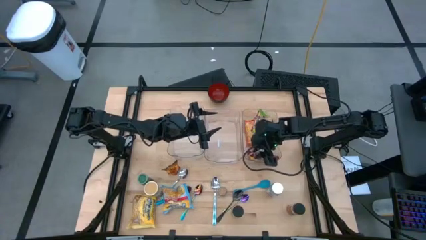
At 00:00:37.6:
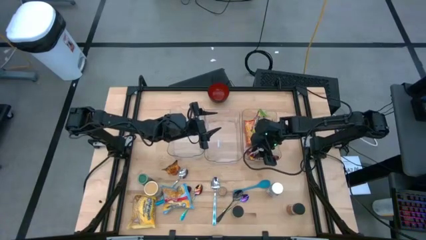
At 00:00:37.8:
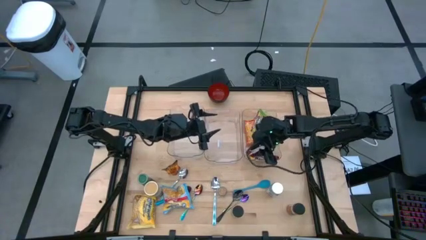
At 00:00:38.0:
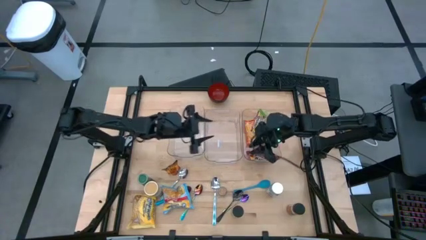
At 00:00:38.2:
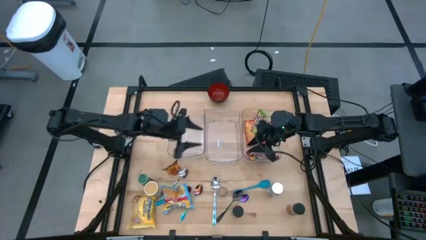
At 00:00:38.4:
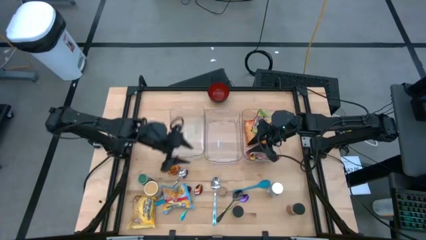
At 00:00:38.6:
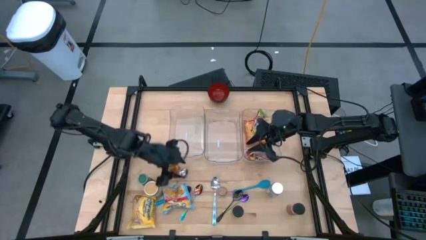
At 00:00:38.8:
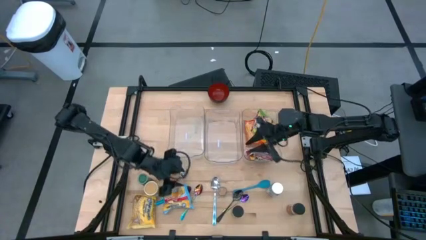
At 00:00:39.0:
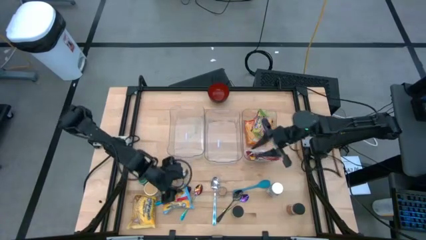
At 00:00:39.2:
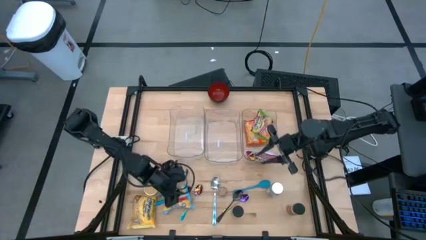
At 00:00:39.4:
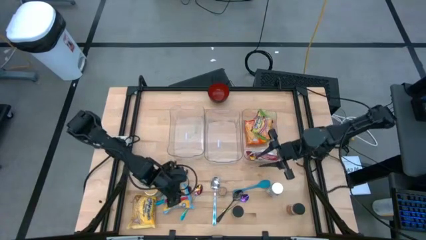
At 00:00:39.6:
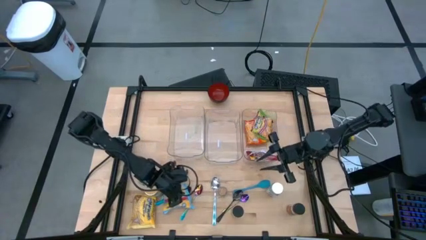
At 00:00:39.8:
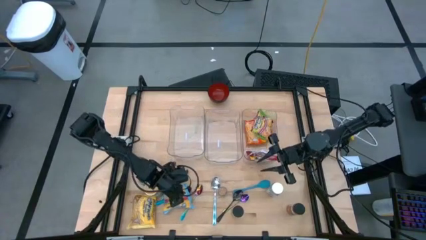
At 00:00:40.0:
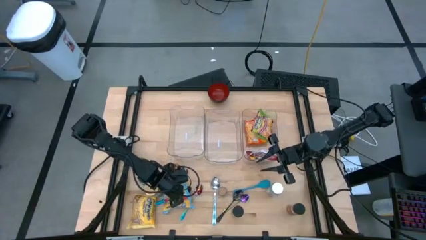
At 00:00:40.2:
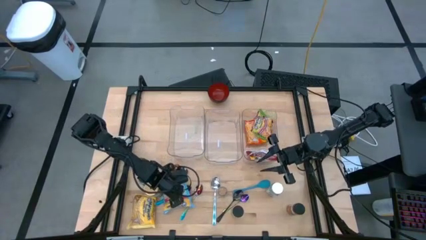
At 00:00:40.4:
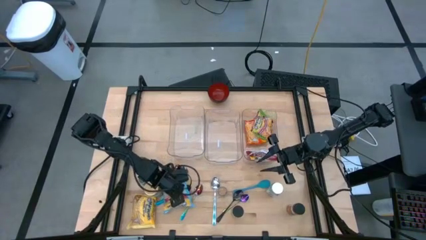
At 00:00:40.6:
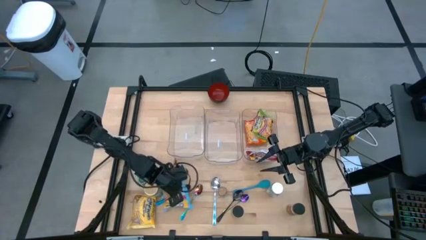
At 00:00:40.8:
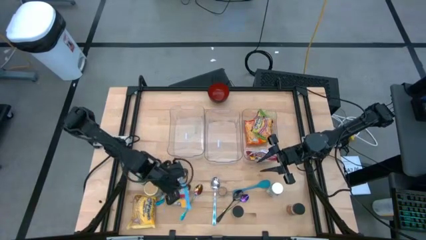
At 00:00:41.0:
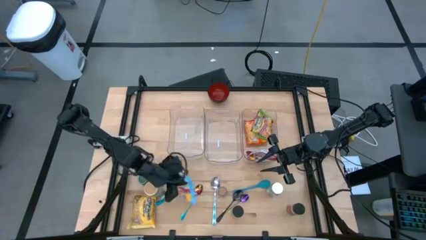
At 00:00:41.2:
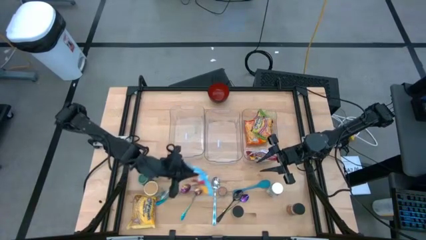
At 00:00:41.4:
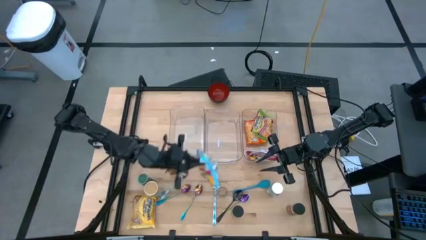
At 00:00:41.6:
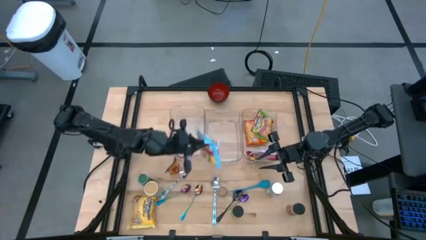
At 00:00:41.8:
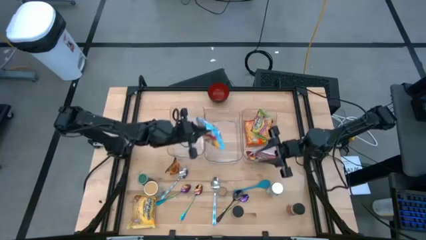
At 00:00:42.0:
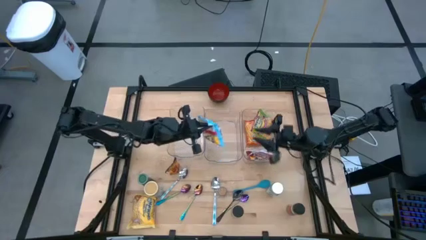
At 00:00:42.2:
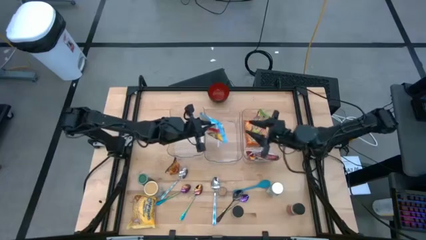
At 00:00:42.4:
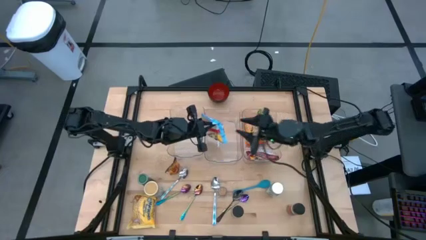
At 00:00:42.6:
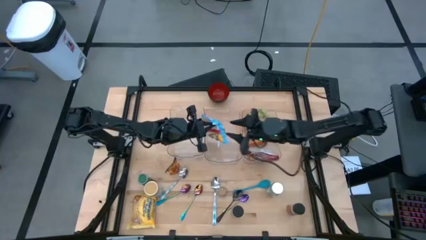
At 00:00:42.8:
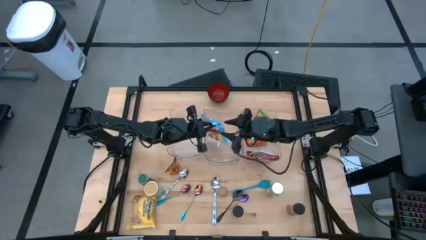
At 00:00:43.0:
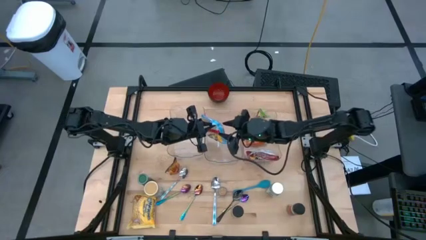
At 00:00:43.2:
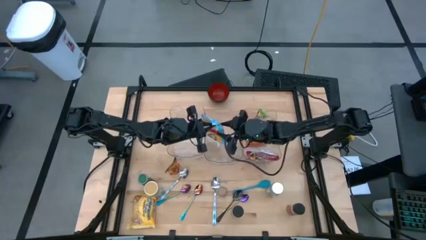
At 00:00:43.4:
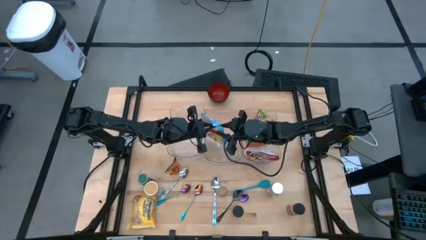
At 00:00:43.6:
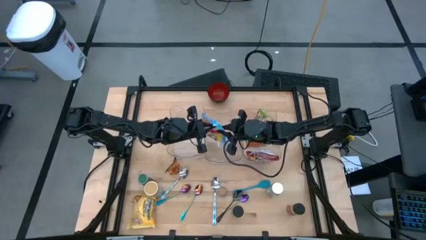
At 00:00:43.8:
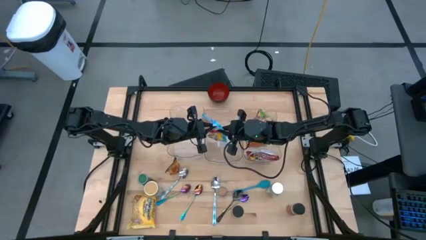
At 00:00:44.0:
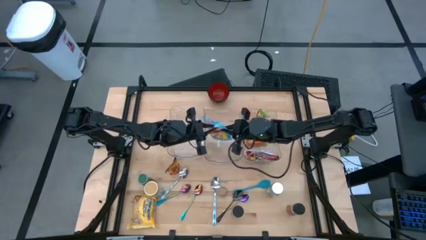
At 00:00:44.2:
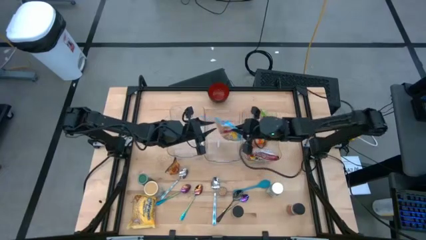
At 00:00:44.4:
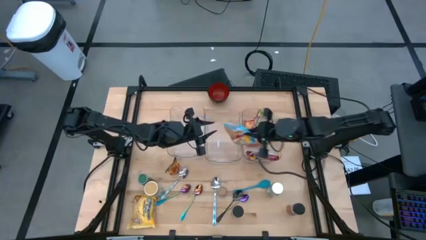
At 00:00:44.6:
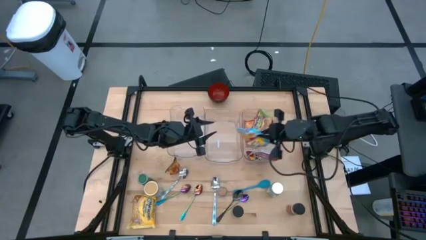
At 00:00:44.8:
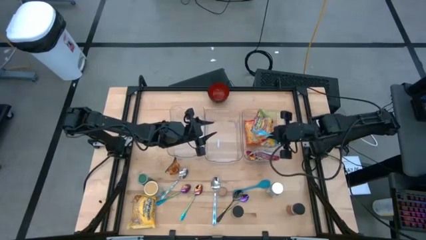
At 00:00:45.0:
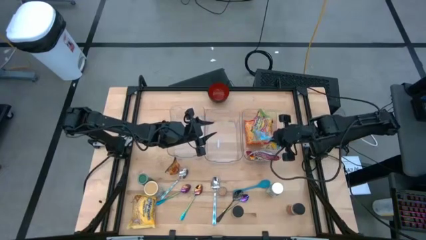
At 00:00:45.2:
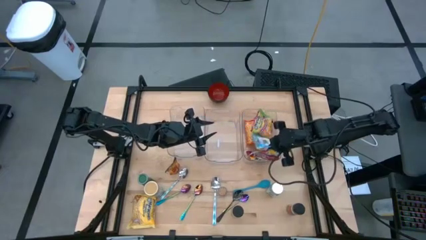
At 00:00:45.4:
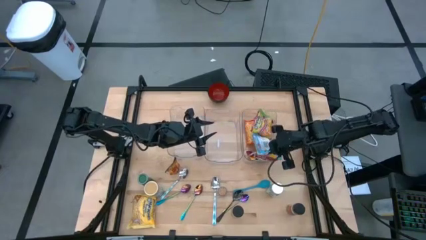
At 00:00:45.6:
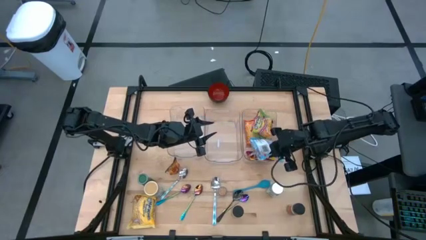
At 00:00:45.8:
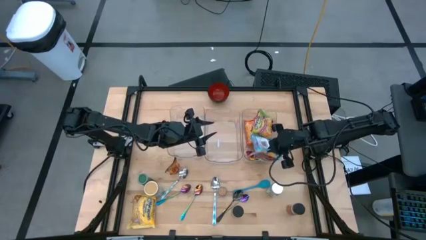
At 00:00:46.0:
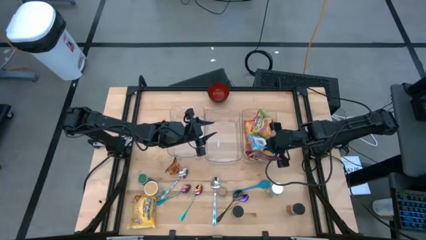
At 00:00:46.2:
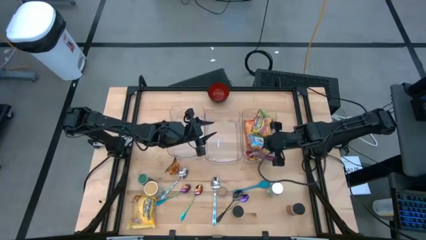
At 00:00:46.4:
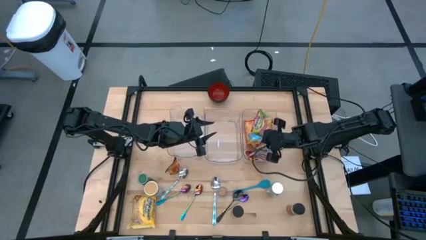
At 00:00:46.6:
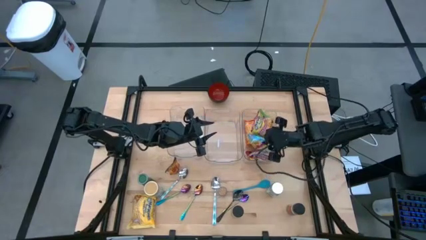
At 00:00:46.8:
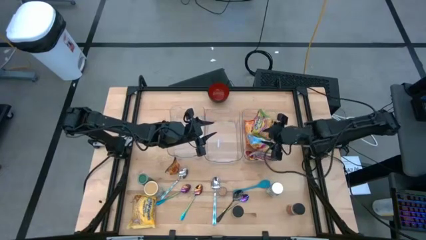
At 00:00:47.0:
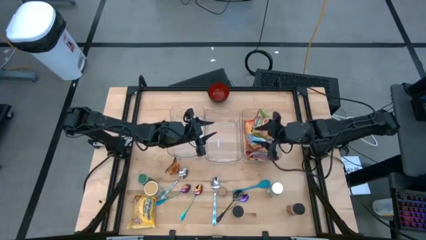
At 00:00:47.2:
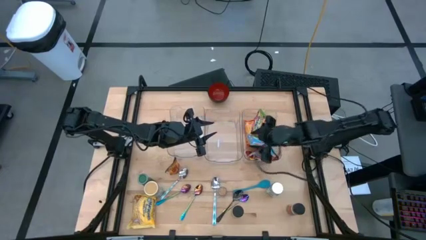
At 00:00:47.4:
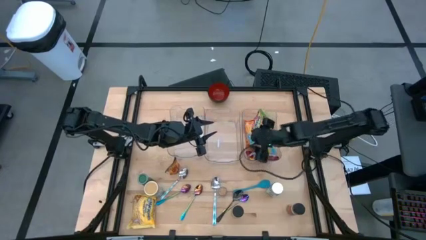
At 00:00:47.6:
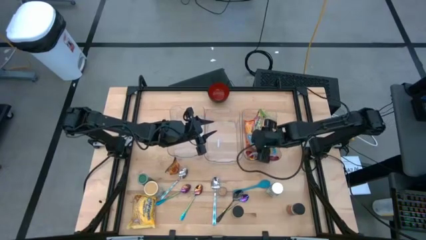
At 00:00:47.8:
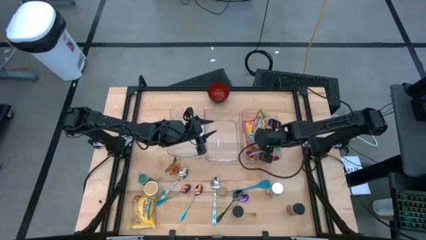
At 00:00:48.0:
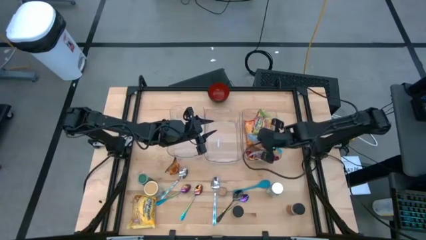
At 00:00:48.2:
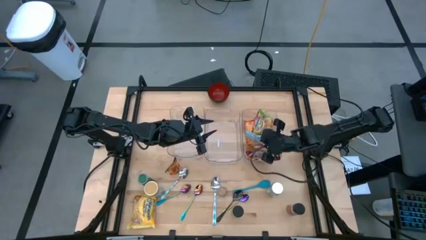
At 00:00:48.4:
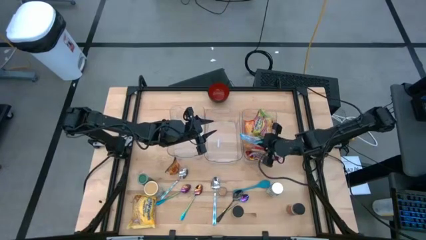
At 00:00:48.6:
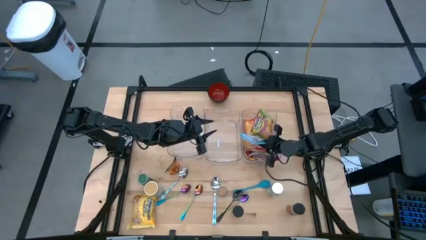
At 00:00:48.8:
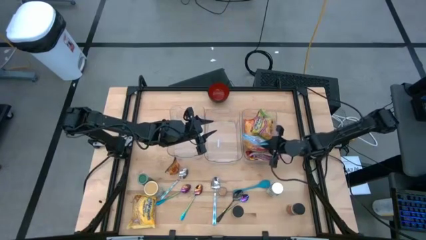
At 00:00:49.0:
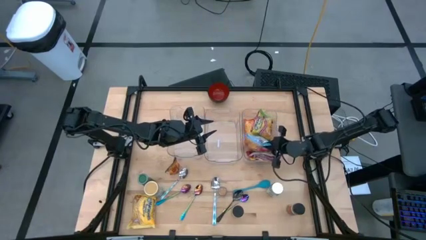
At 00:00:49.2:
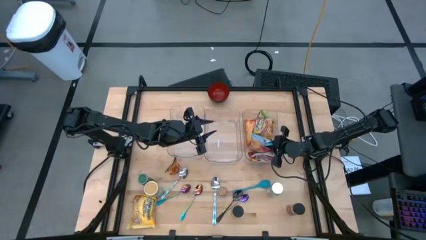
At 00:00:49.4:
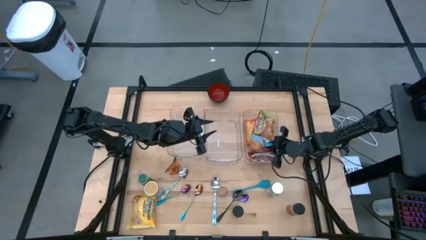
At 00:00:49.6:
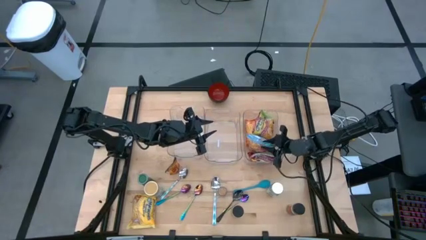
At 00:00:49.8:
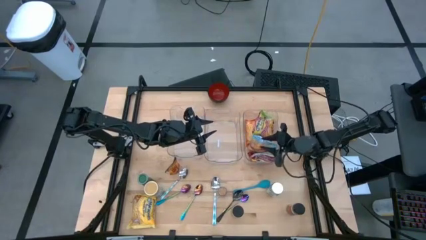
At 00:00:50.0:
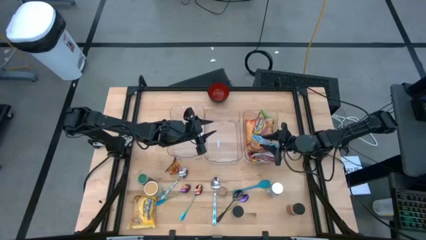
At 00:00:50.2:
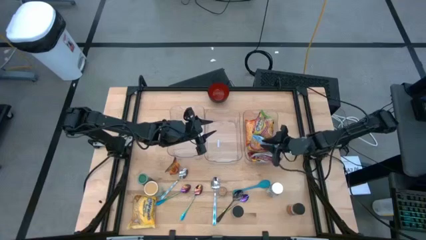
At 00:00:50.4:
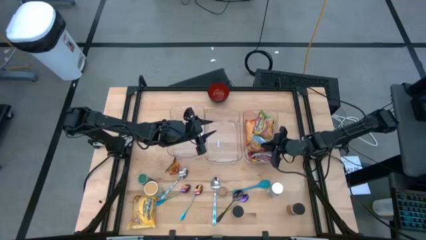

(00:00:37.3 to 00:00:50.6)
Task: Pick & Place Food Item
Put the blue noodle pack into the right transparent bin
